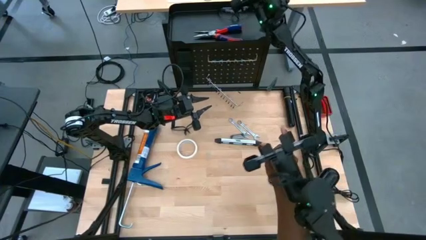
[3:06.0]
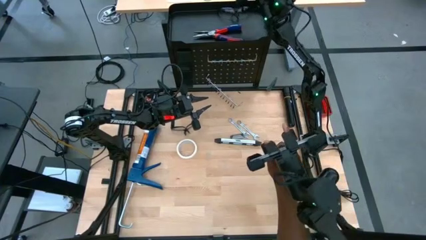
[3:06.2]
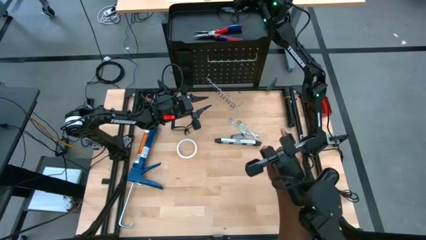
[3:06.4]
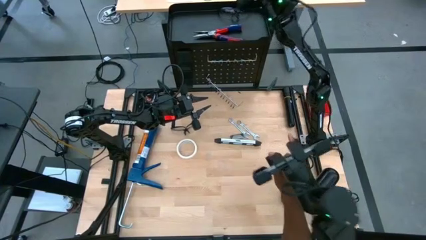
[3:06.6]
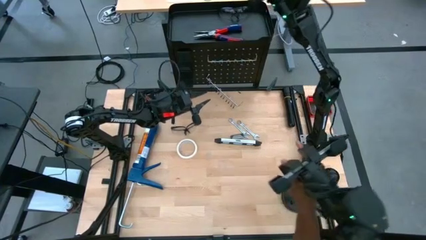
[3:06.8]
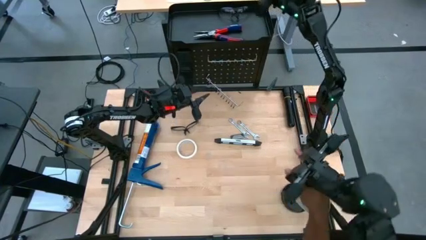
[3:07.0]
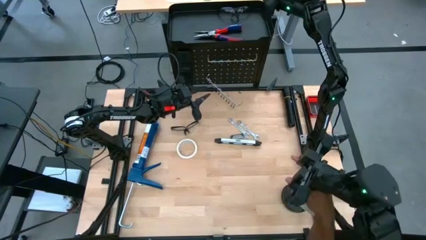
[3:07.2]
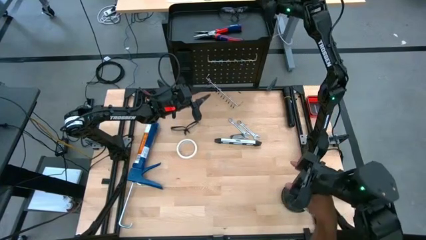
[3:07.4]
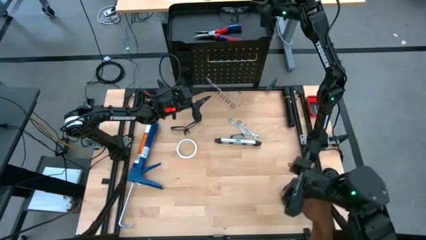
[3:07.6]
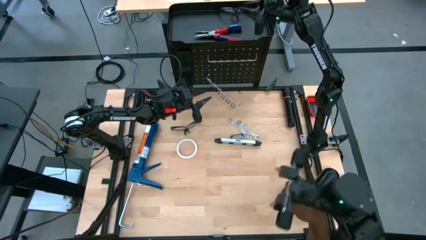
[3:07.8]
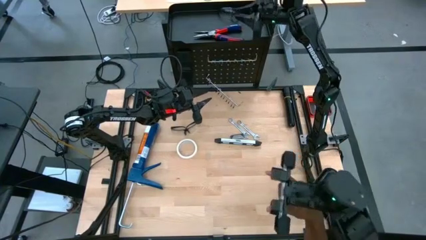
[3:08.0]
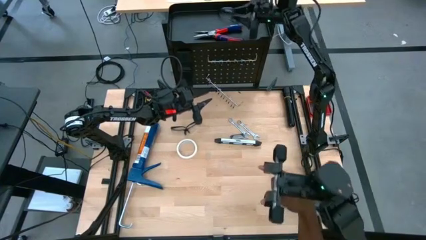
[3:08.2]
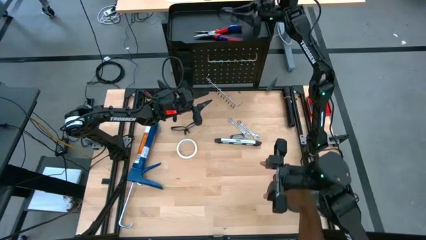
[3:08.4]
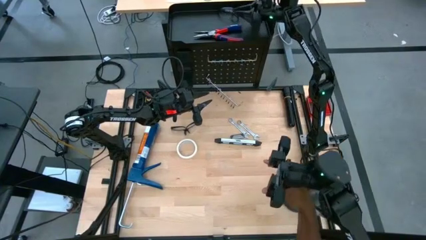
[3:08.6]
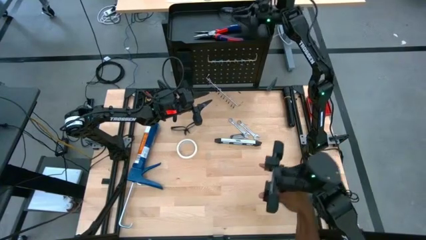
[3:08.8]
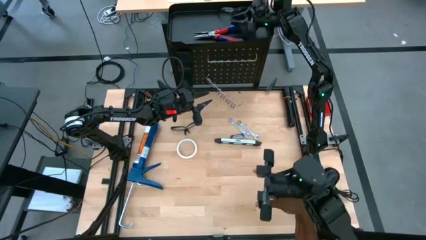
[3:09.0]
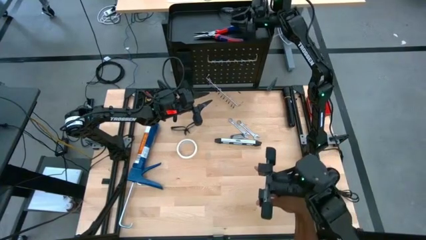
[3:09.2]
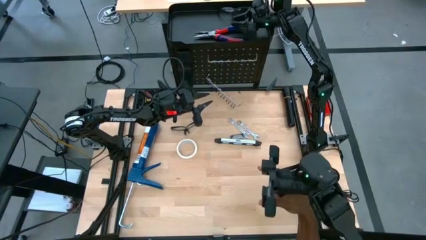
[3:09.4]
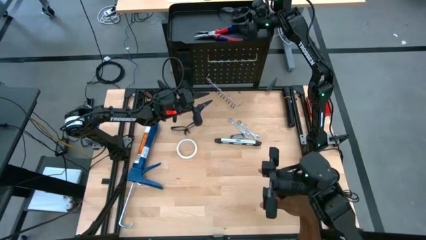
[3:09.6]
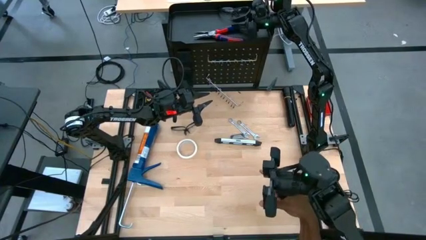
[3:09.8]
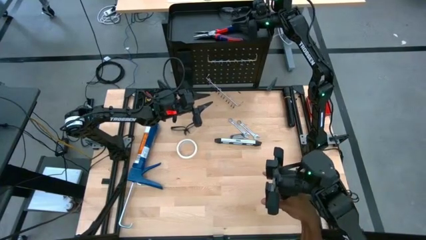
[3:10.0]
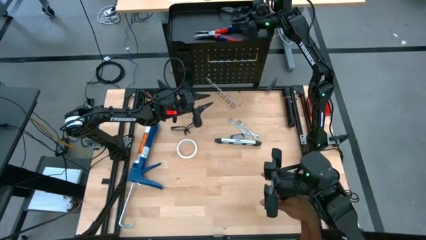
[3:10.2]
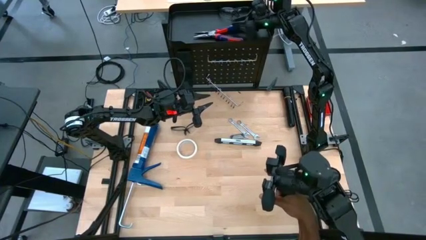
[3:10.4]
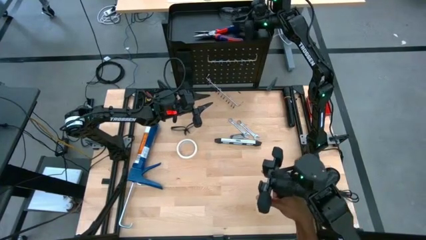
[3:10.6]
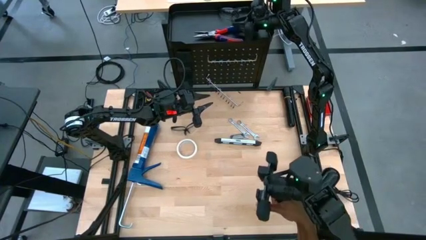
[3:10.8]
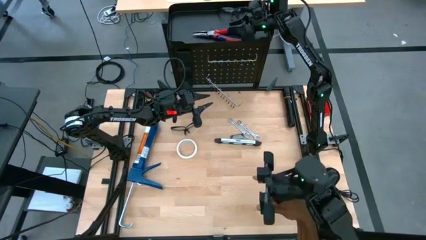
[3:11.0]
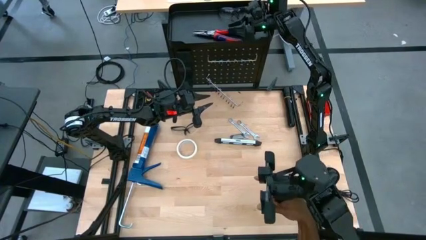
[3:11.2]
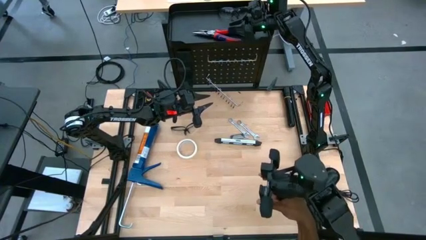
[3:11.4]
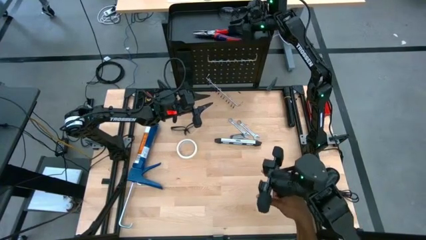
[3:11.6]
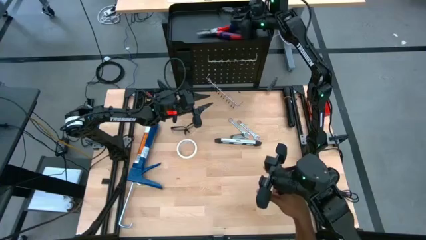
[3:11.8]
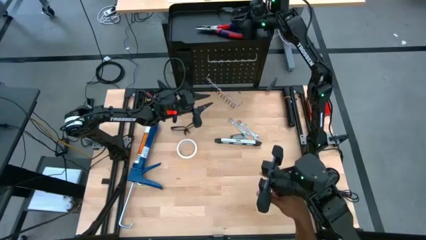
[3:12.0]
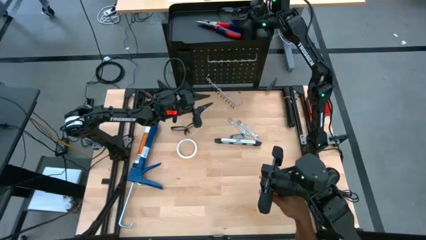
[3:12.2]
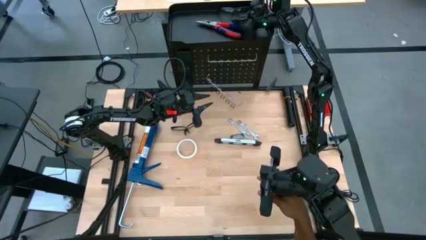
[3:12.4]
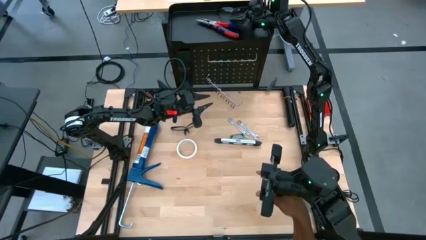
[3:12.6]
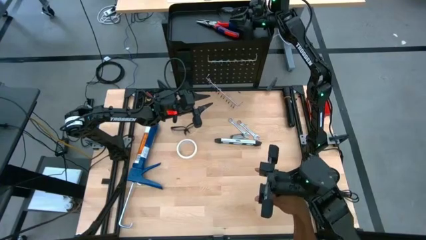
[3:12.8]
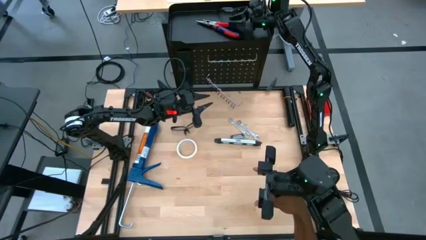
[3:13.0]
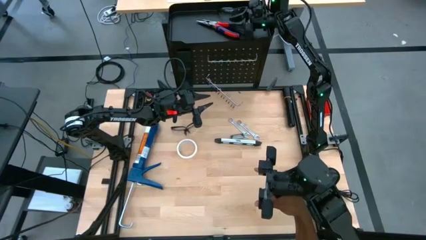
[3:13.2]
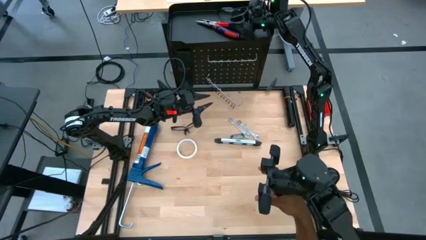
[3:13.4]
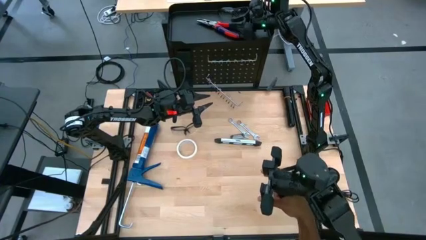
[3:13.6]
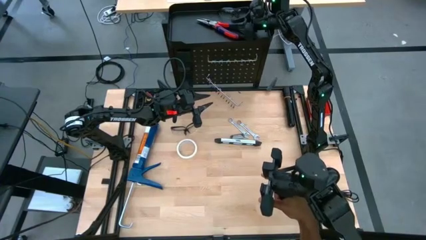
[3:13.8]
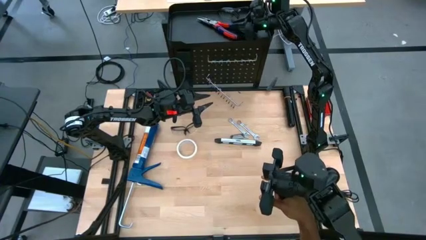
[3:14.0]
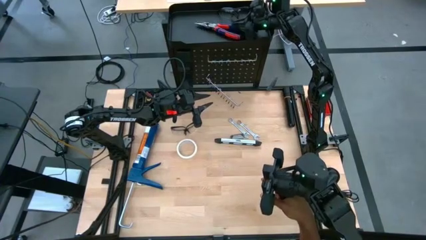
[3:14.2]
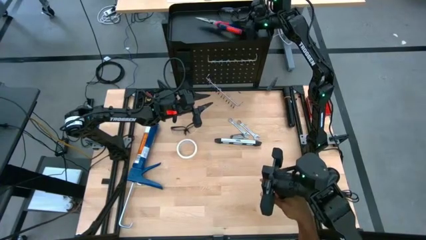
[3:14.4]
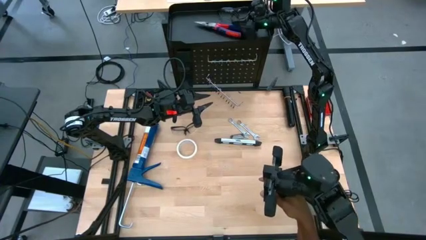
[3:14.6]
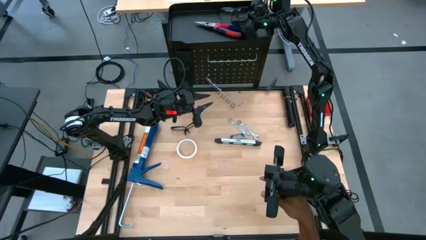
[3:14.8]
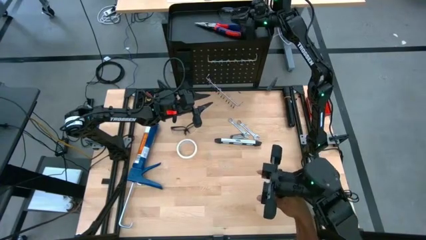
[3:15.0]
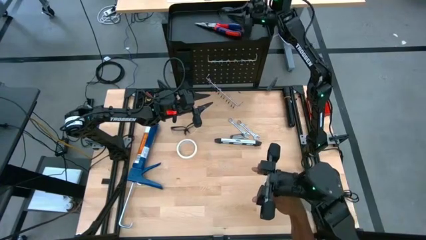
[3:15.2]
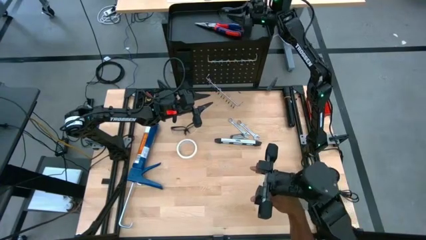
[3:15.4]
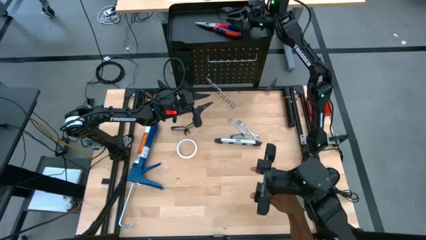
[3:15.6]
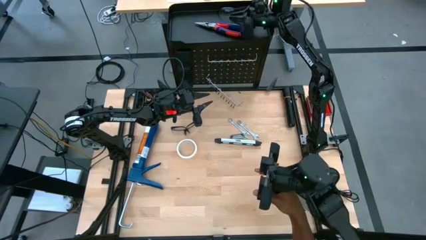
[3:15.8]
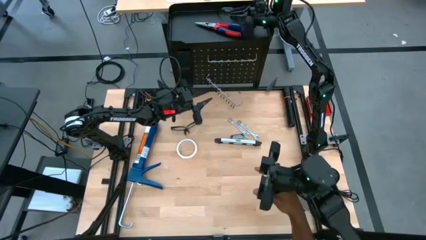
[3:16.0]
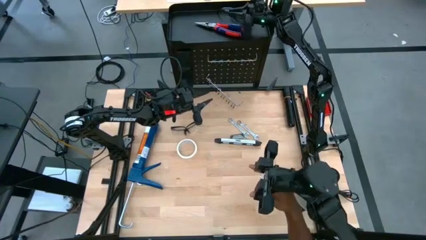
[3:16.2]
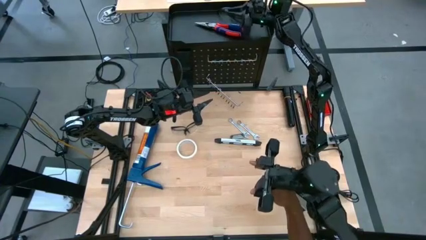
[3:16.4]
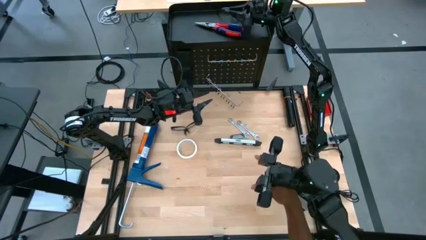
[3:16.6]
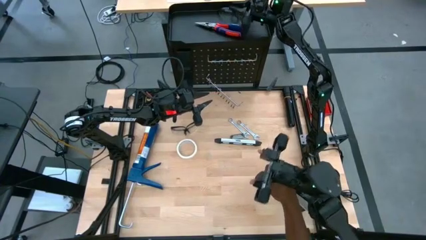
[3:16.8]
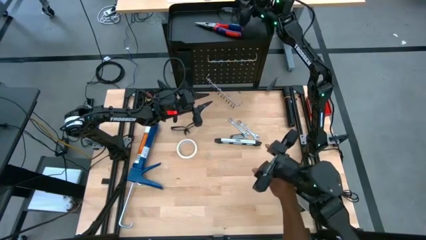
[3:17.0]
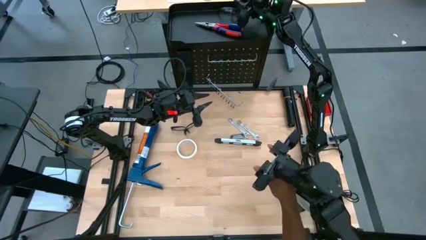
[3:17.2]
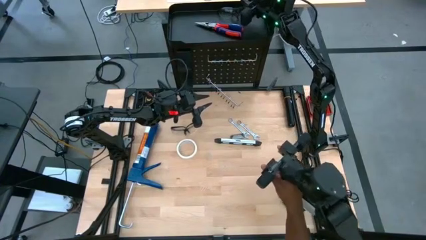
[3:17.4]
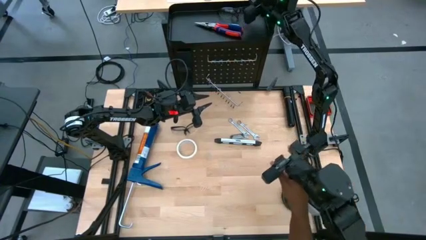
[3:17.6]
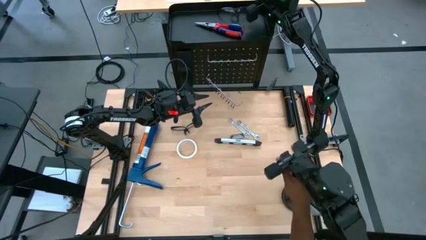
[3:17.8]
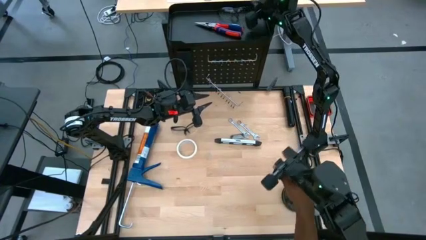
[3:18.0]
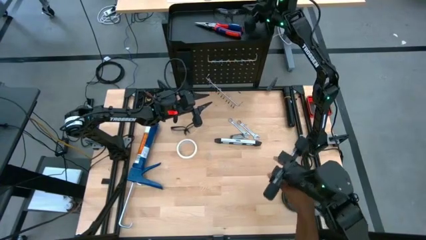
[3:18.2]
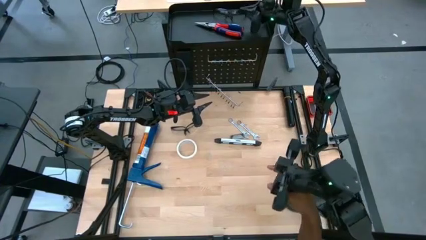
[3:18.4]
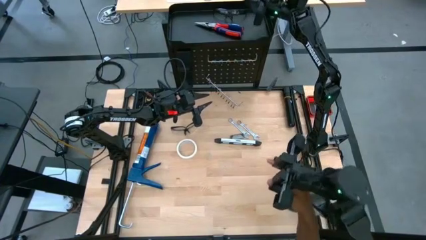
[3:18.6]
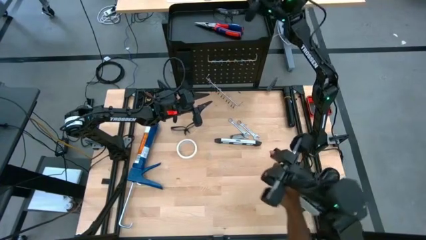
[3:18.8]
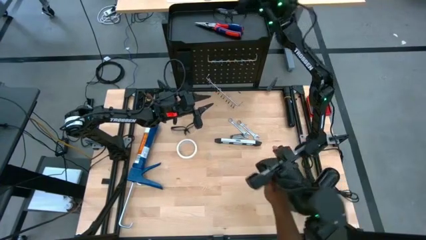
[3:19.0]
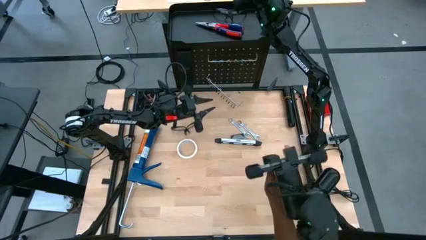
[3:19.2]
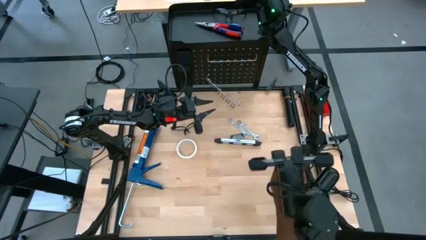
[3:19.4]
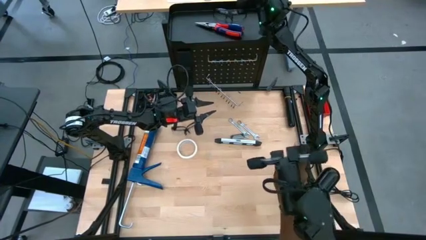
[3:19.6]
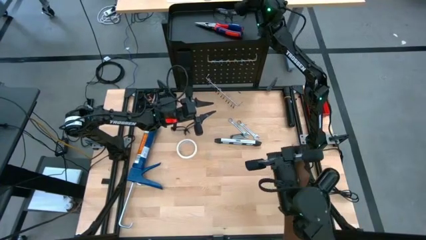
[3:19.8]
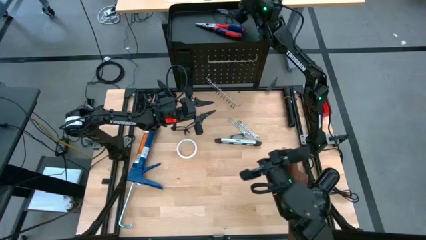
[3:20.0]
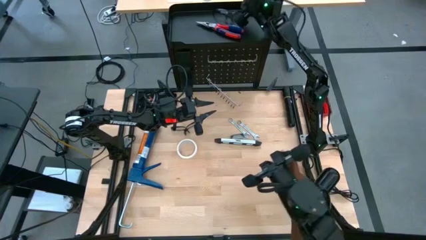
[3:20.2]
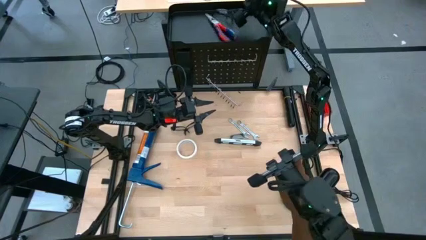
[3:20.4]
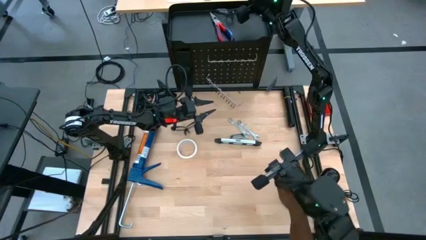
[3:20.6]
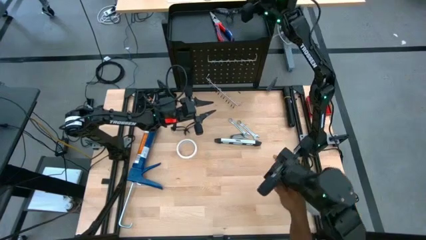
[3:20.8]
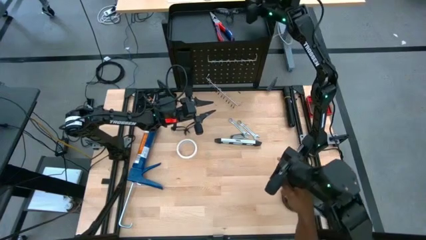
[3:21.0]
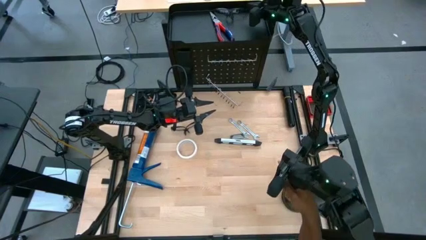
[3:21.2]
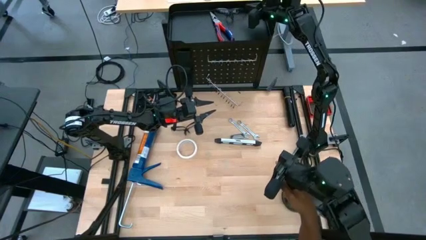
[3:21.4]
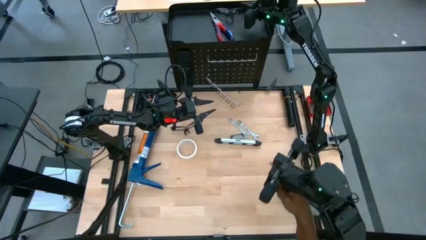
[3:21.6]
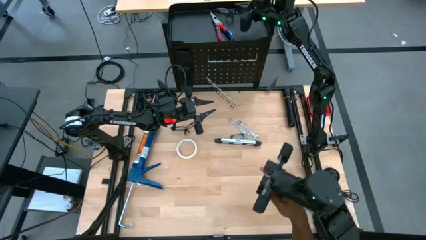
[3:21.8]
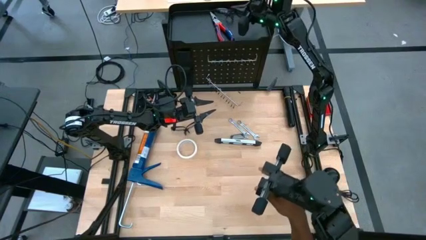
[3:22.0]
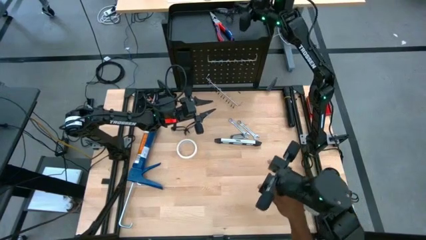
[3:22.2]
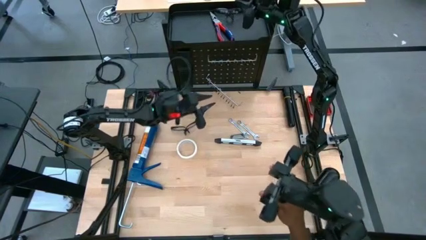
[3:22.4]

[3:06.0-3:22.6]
Task: Hang tools onto peg board
Remove the pliers from the peg board bin
